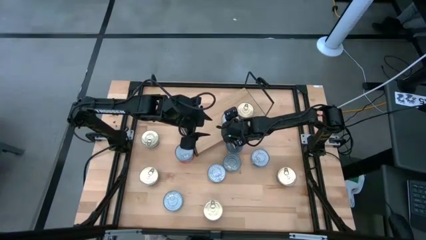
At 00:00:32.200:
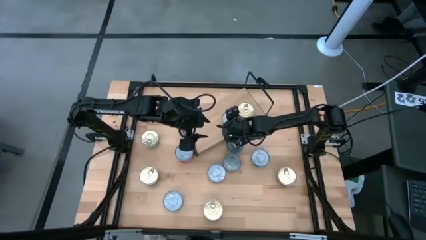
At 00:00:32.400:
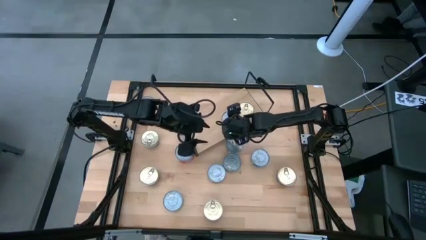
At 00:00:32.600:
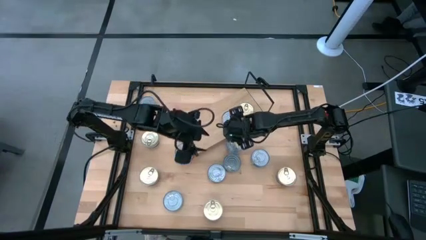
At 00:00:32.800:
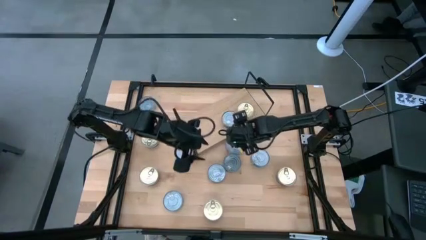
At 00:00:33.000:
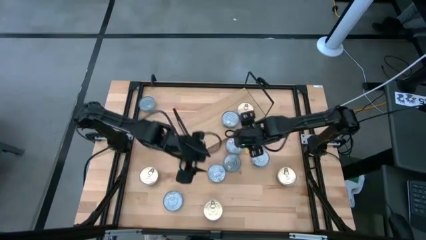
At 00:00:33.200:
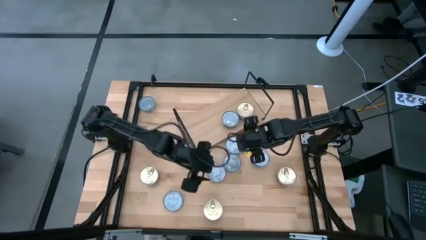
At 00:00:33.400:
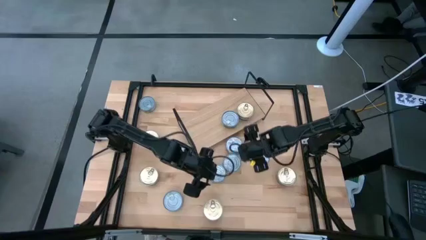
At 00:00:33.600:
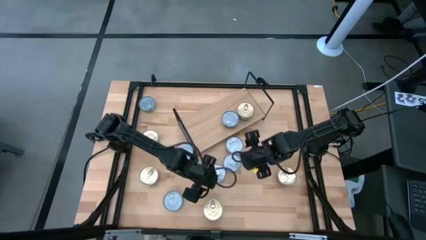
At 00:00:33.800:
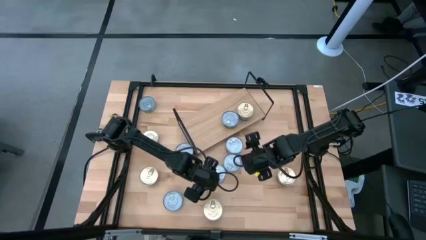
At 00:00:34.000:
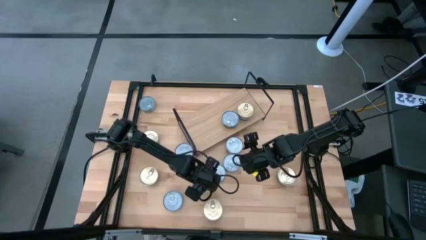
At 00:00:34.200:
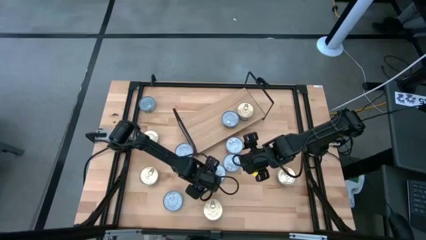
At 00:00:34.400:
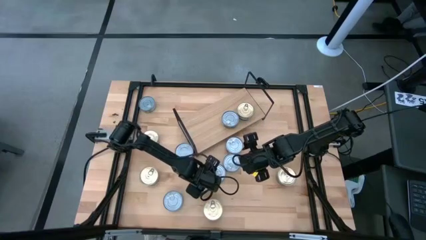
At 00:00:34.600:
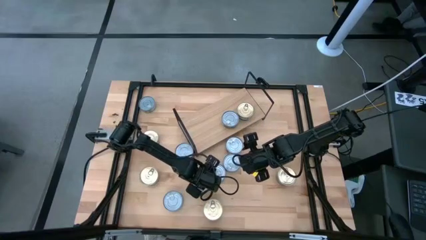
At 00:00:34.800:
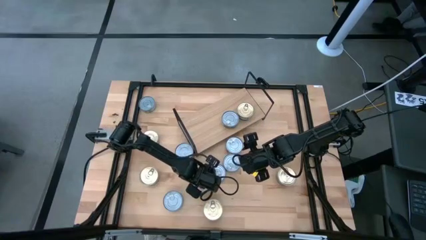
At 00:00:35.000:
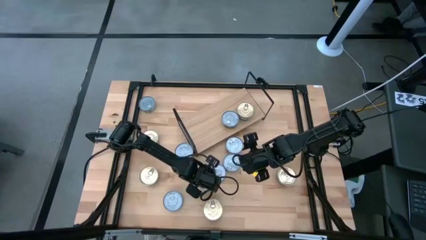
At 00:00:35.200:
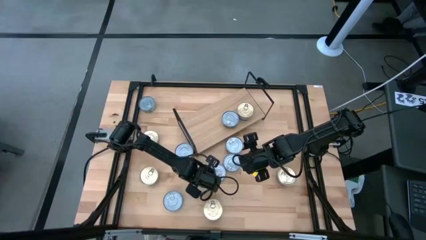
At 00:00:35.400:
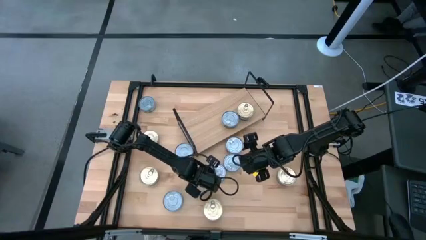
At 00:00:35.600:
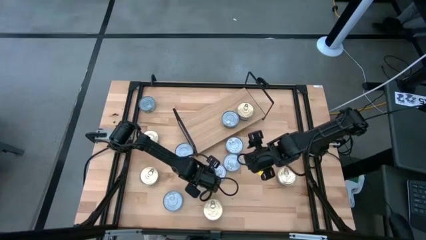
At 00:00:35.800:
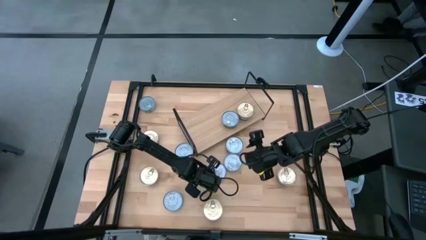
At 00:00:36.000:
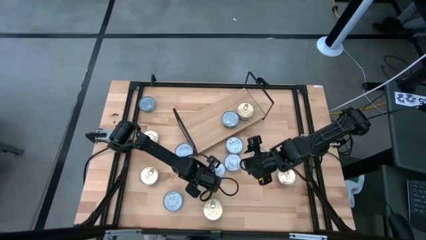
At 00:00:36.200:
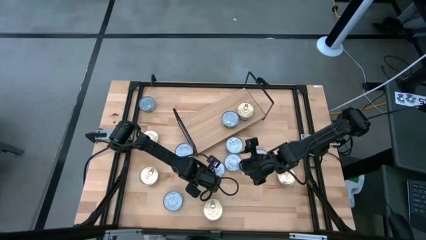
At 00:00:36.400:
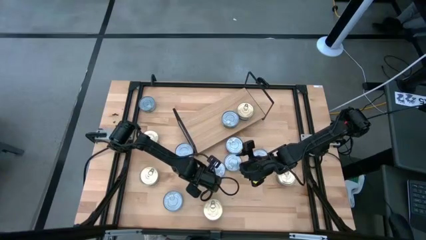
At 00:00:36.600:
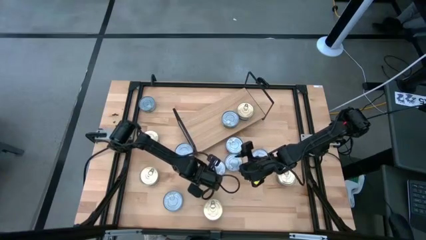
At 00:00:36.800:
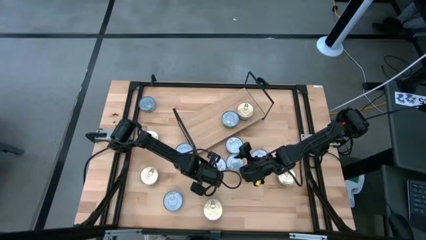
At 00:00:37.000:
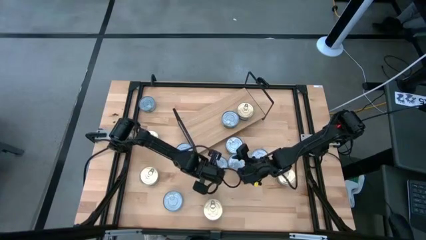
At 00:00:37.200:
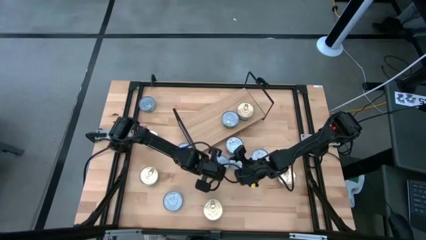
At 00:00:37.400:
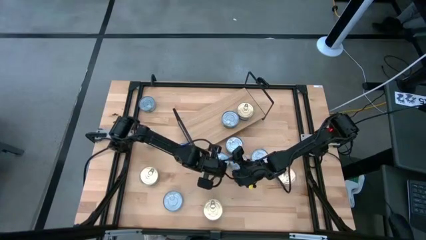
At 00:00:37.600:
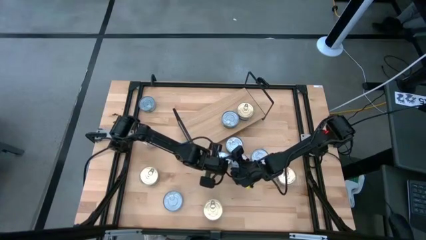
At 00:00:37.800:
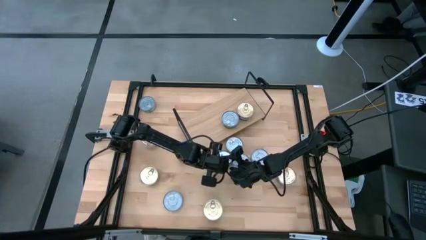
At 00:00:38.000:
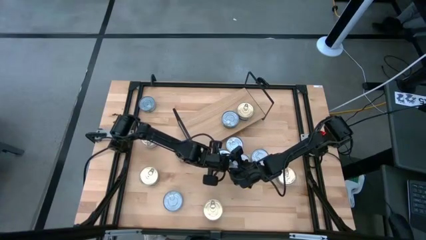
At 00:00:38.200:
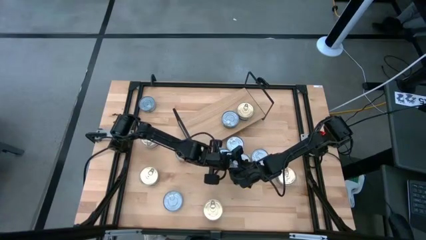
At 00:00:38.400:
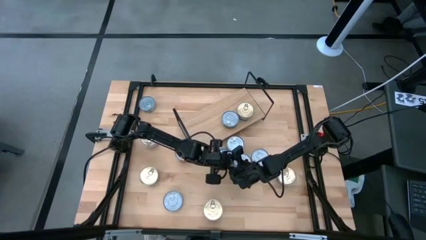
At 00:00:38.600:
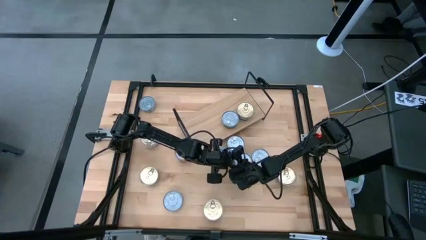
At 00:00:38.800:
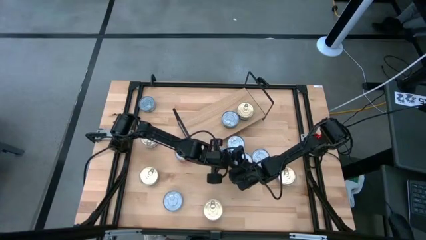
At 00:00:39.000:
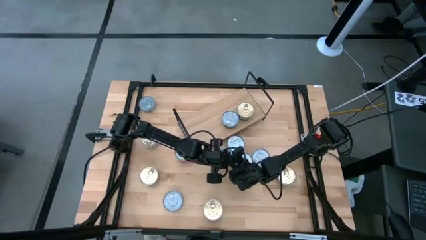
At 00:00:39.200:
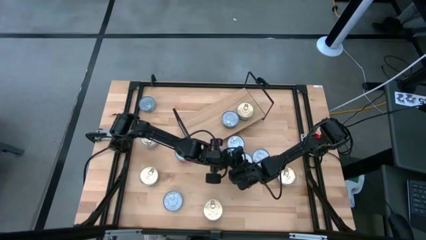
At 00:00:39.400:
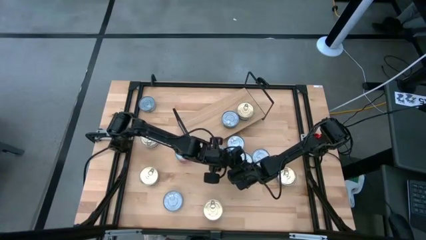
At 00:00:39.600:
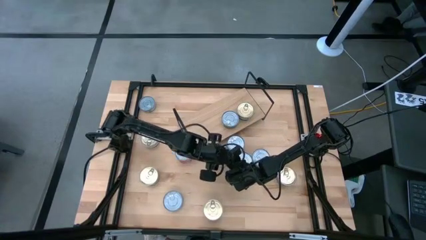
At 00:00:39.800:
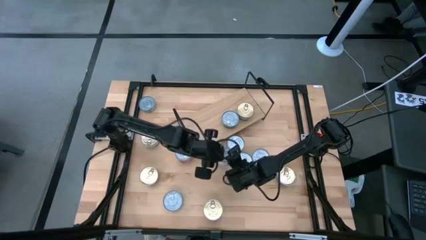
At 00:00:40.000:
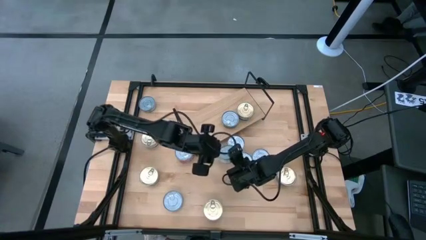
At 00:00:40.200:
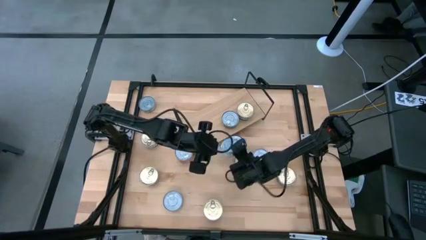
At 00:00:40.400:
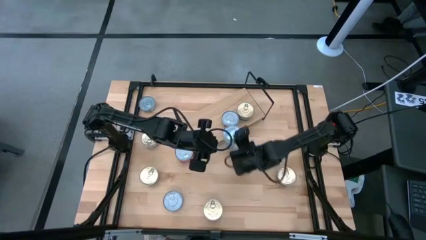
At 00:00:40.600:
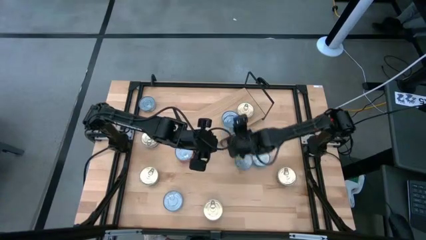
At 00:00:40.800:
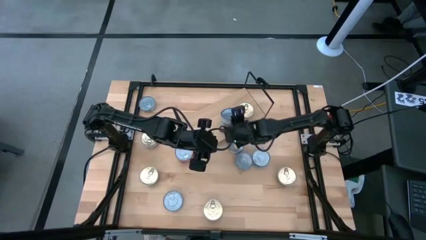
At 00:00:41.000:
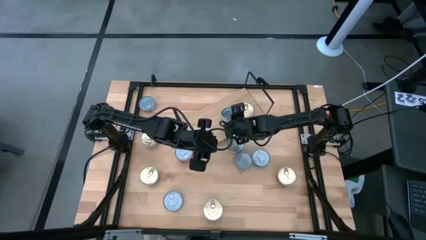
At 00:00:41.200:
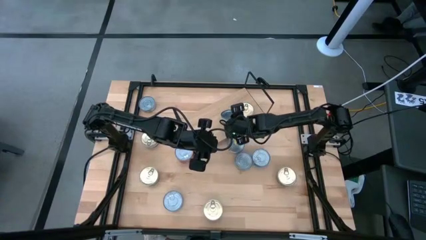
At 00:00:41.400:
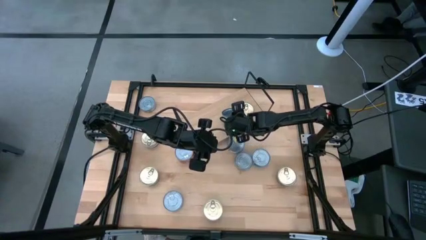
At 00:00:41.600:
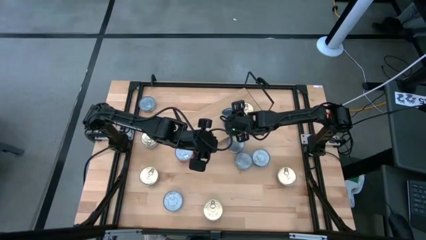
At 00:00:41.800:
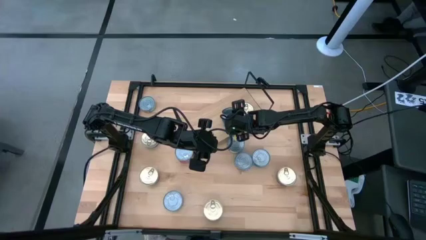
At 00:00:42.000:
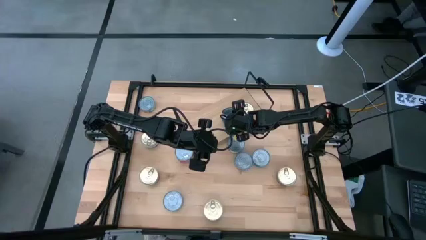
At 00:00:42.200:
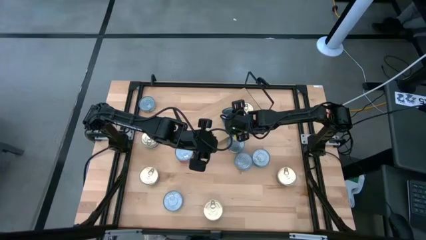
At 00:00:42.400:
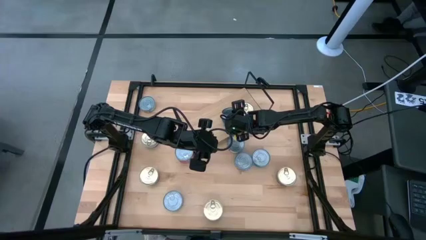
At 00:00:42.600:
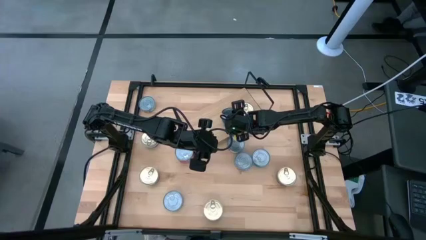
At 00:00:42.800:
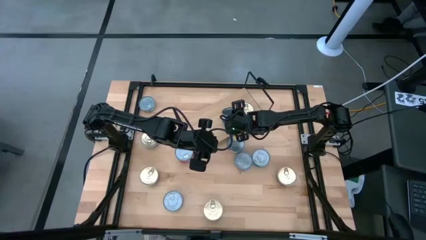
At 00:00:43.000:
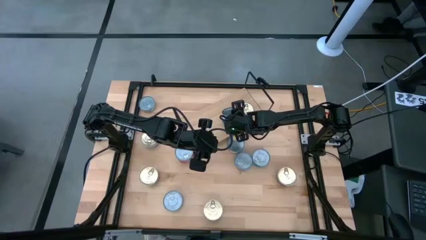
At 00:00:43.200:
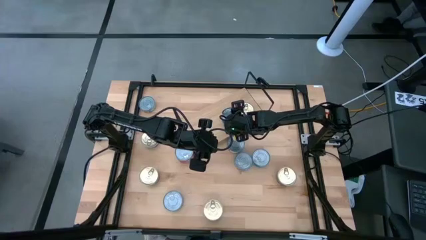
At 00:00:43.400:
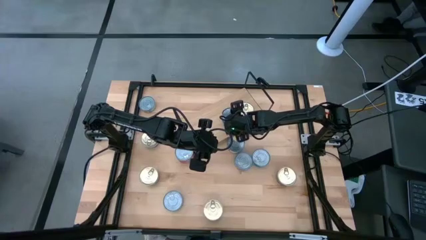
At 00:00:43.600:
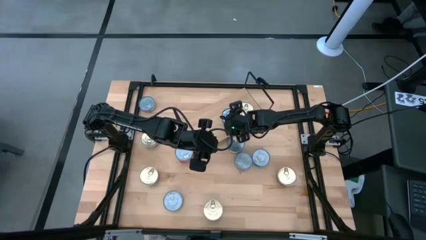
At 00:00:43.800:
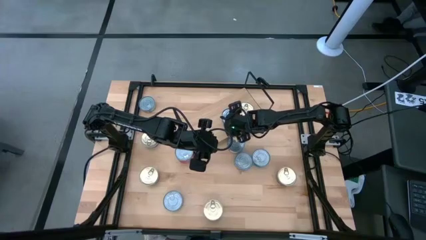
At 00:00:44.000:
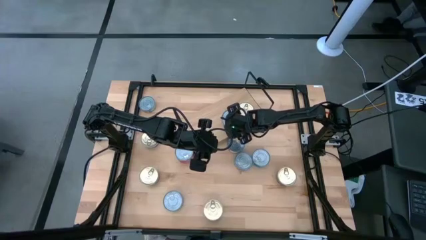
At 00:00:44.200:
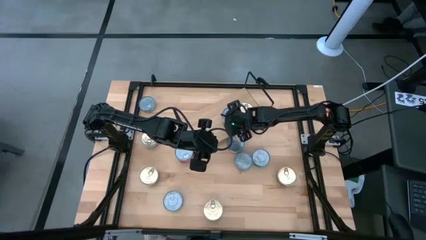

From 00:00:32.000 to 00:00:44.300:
Task: Stack canned seafood by type on shelf
Stack the green tuna can on the shelf on top of the other green tuna can
